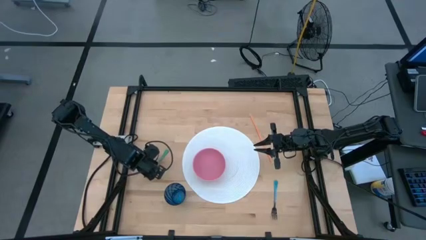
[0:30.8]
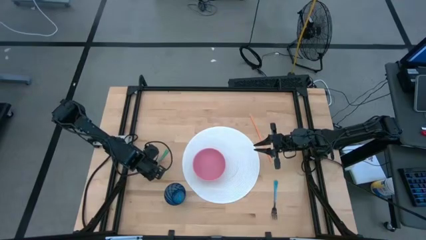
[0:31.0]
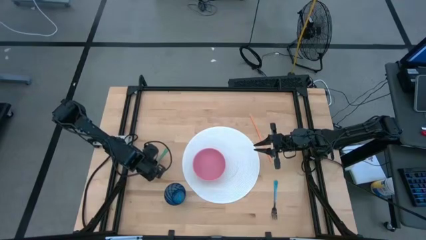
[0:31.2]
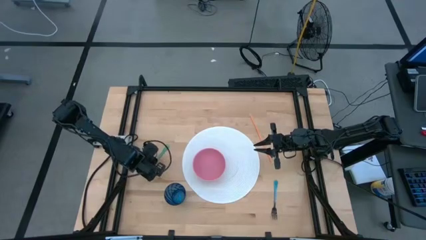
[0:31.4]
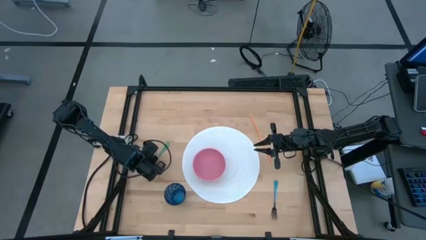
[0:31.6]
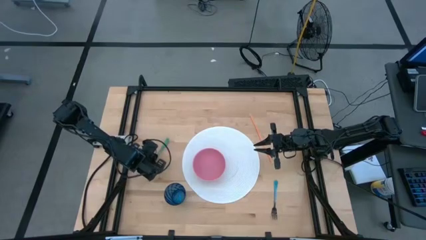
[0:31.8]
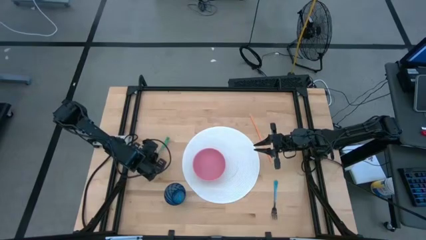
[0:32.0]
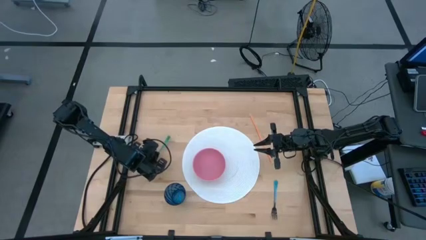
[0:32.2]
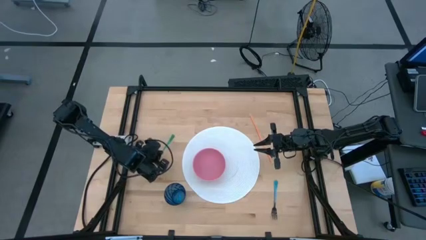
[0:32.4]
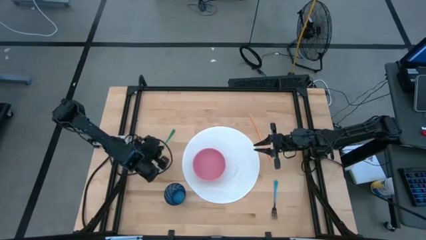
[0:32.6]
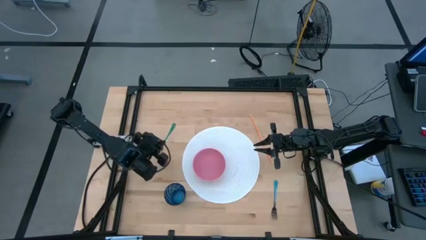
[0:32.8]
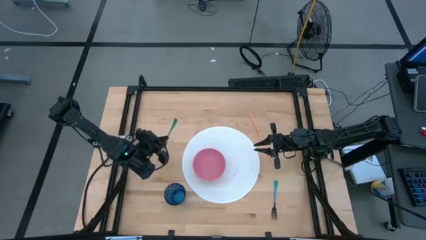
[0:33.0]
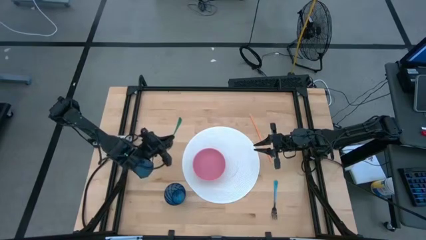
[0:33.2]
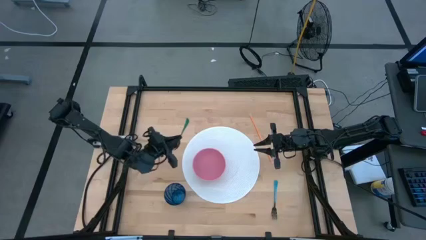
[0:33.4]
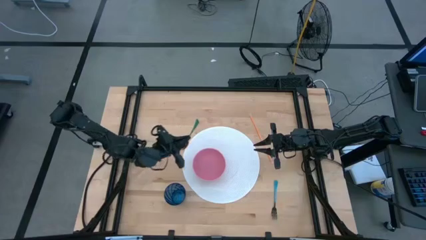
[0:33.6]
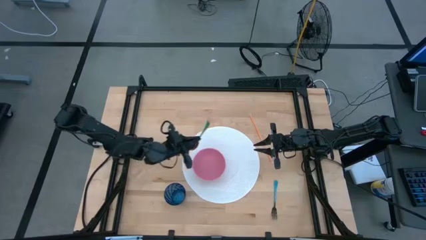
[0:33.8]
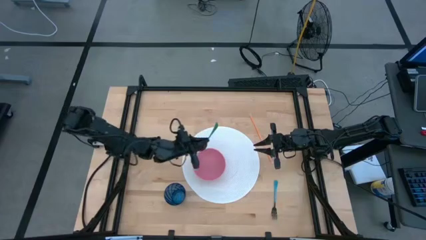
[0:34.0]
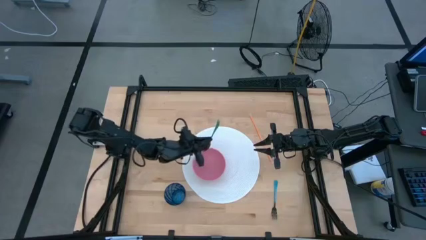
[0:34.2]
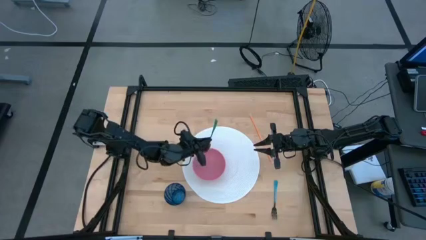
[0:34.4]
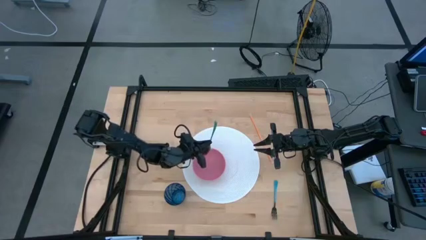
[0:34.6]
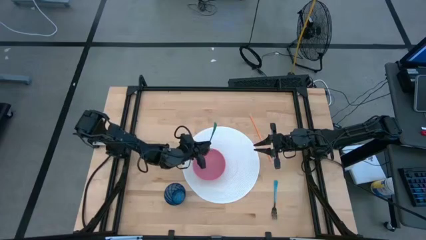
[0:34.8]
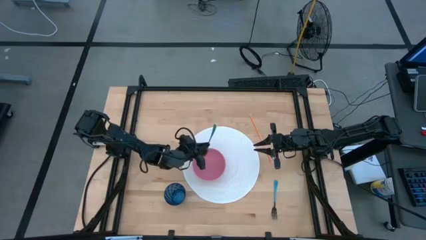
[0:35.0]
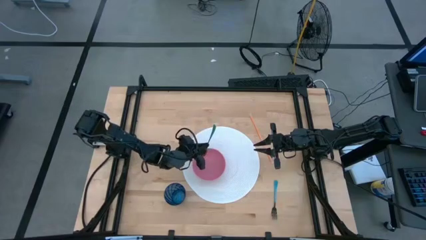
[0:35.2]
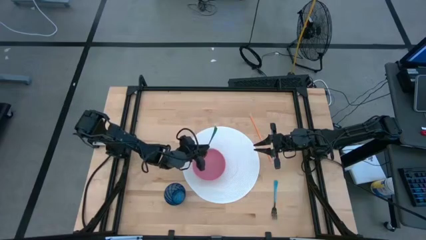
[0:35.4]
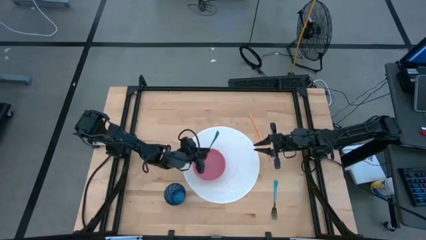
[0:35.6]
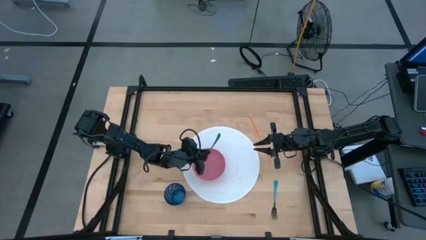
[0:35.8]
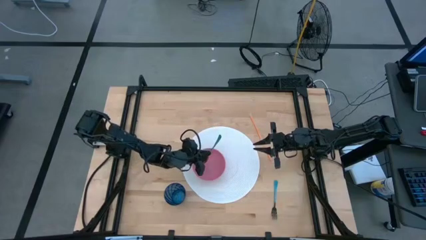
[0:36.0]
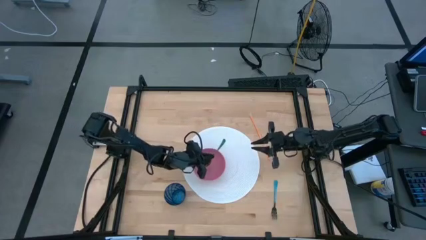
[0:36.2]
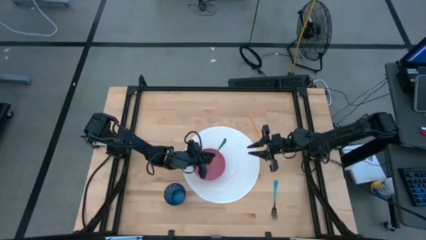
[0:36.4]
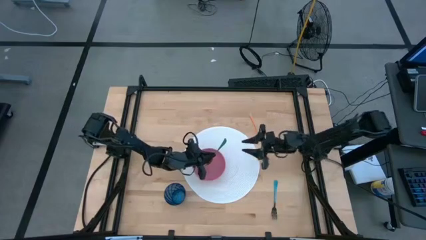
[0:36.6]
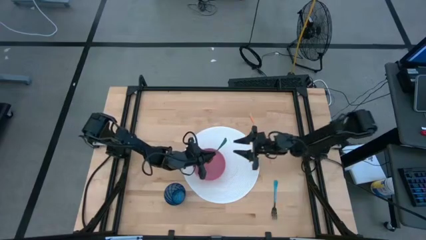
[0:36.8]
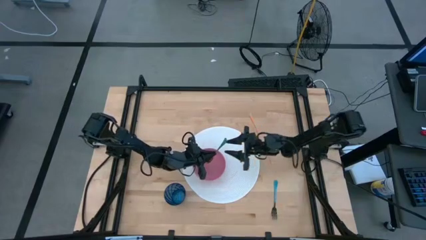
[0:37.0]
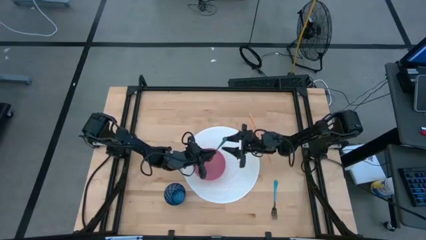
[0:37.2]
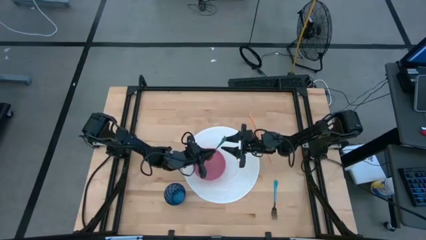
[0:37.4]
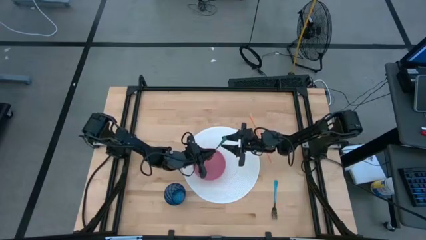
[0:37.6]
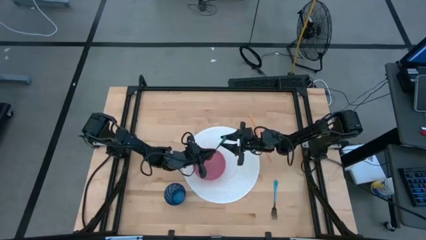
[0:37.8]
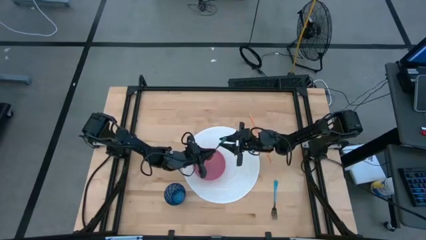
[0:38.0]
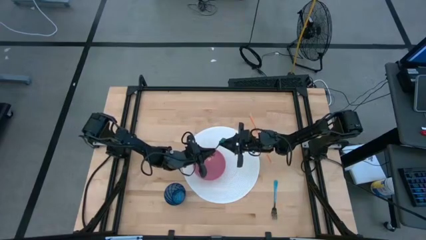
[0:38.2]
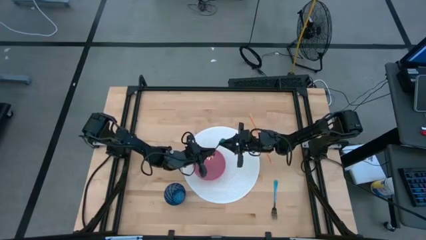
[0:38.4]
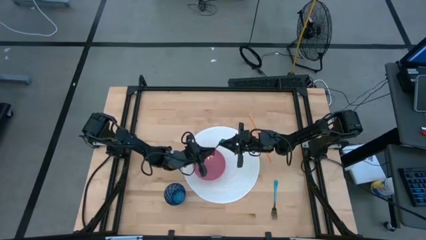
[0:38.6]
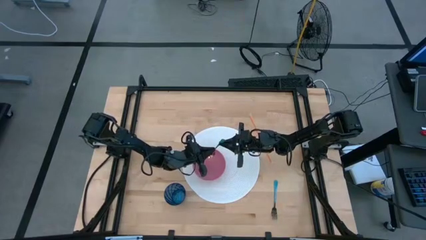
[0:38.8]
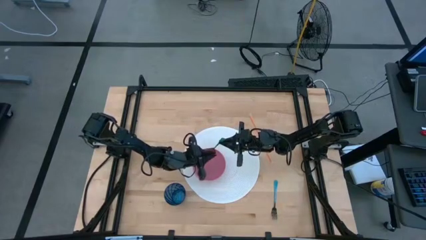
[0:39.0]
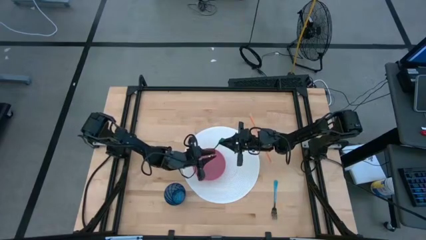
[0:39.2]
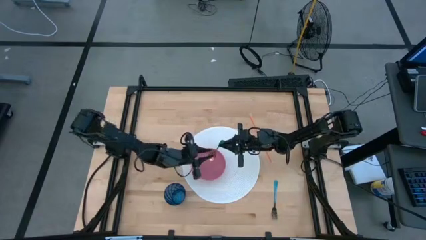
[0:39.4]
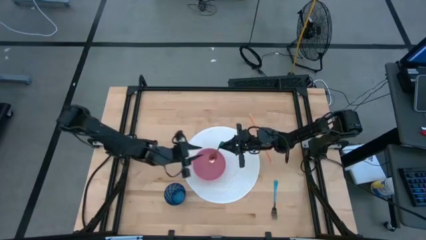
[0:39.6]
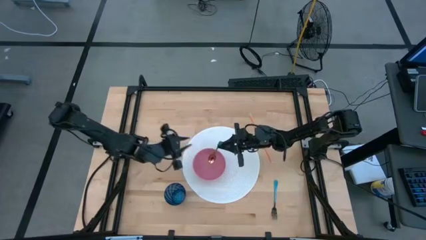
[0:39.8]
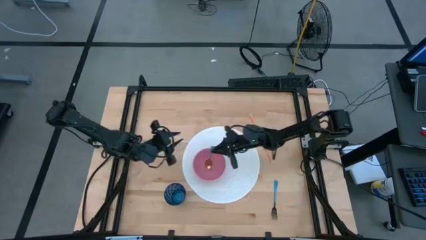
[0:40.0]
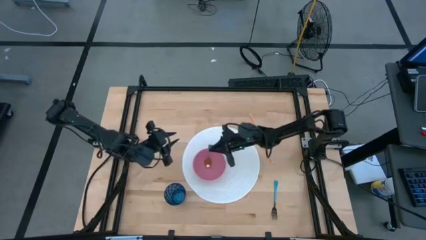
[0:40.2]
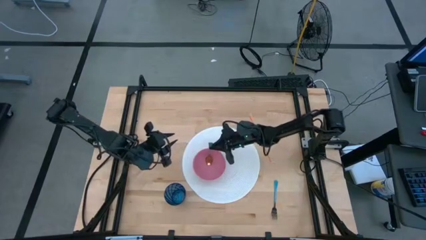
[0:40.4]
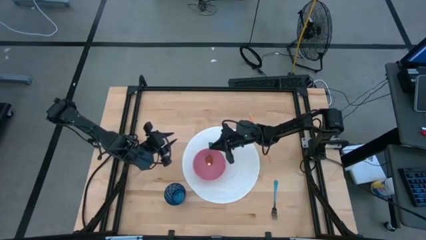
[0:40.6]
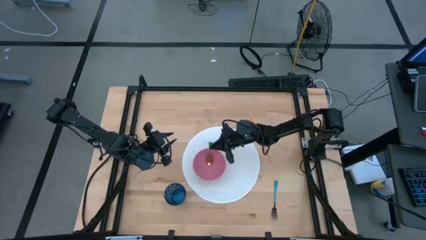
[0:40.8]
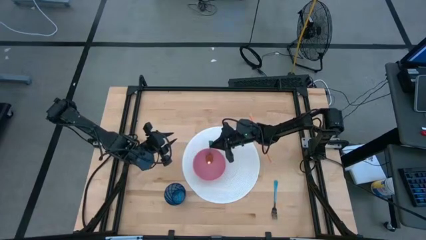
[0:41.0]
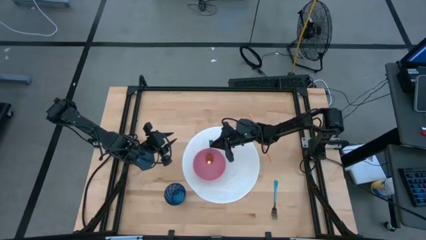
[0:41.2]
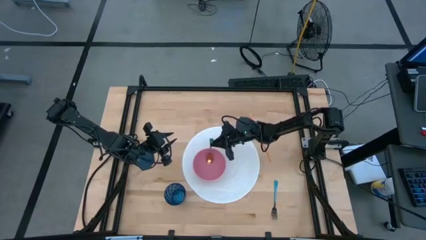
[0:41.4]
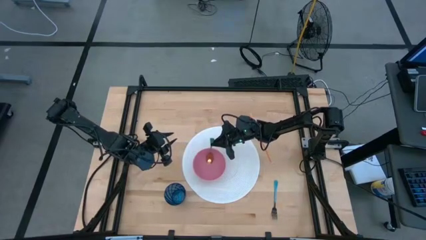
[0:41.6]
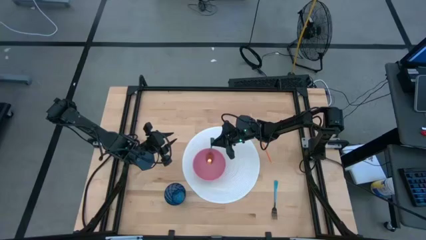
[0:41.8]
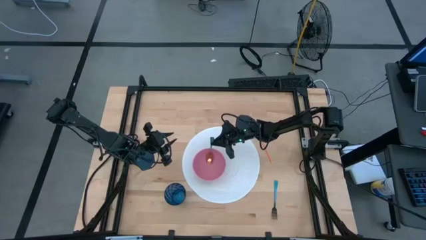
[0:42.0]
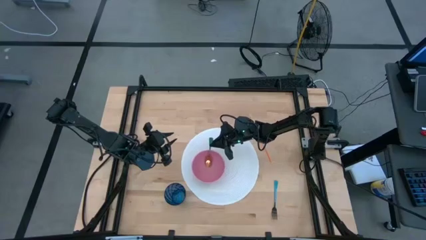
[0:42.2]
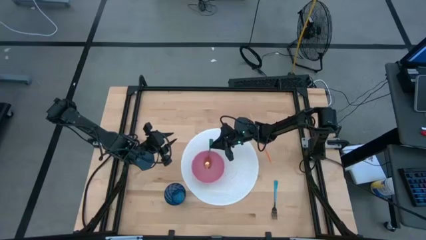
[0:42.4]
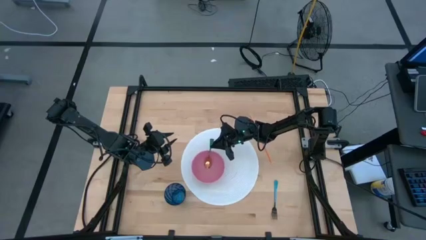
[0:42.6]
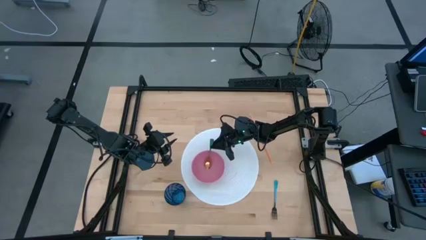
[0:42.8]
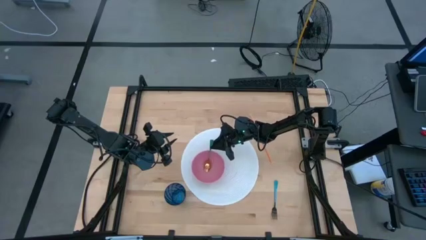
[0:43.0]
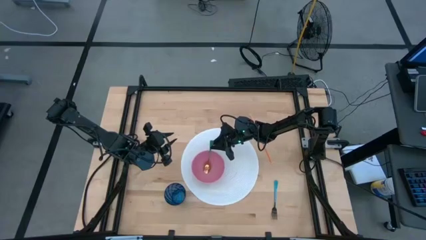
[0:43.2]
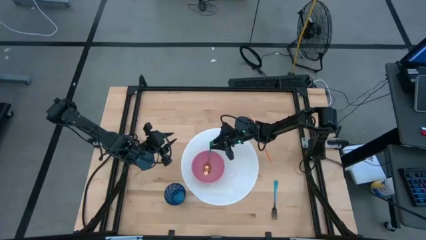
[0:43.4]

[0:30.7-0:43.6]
Task: Pick & Place Utensil
Put the green spoon into the pink bowl

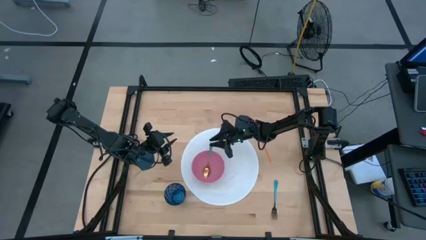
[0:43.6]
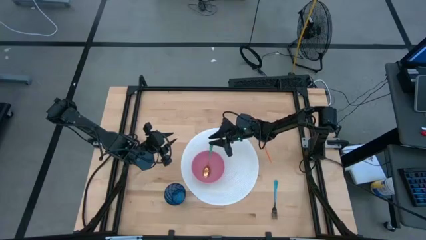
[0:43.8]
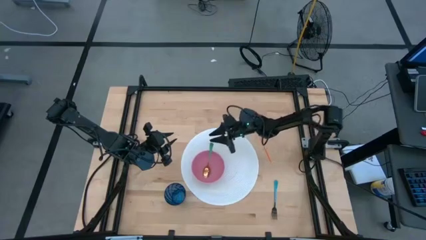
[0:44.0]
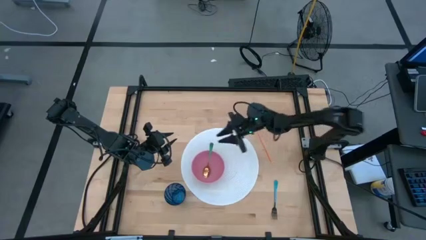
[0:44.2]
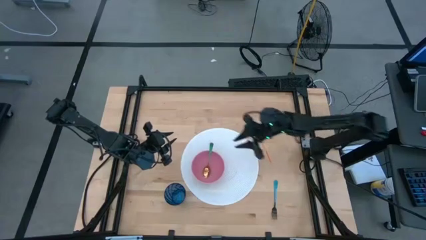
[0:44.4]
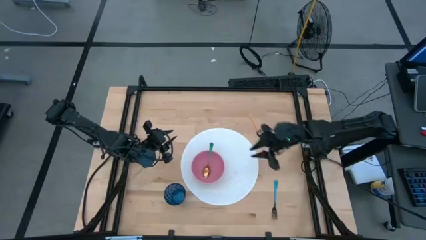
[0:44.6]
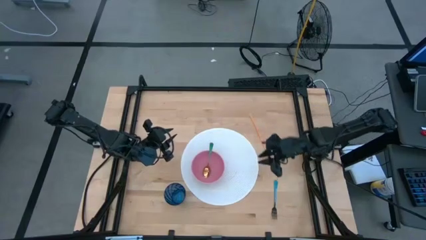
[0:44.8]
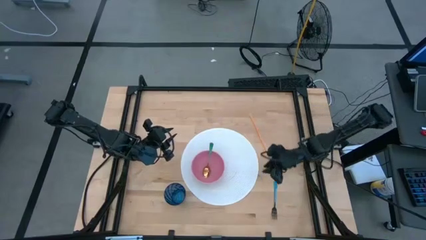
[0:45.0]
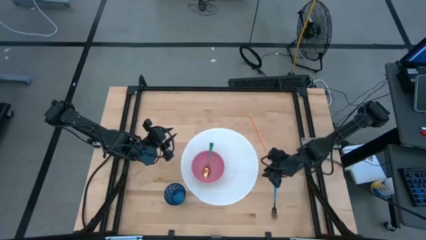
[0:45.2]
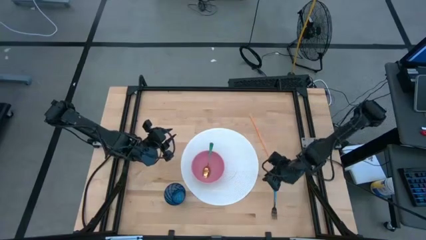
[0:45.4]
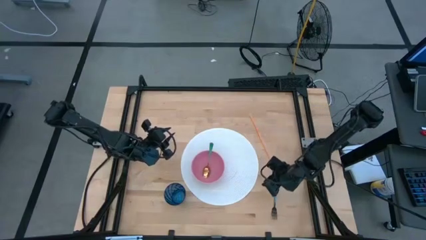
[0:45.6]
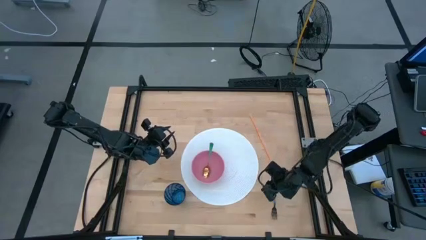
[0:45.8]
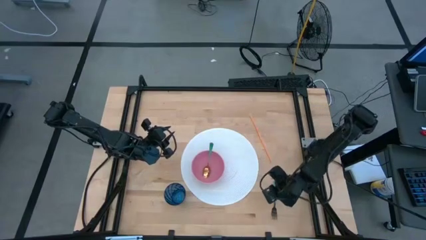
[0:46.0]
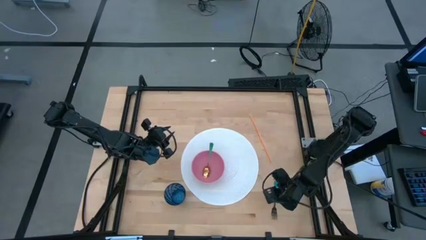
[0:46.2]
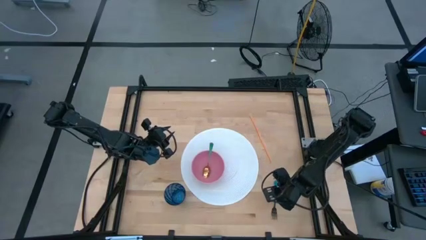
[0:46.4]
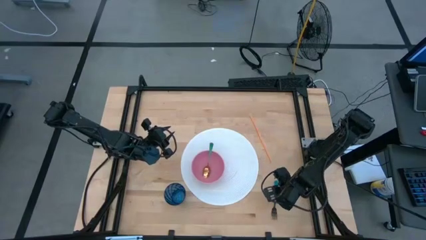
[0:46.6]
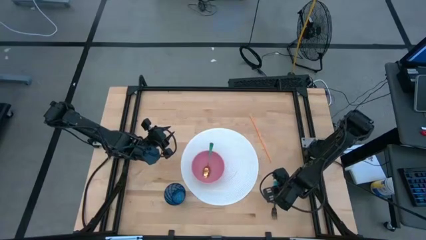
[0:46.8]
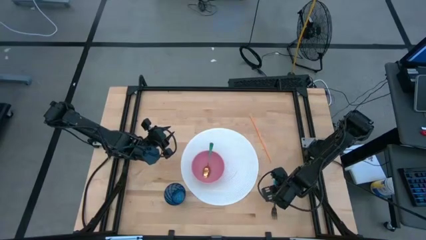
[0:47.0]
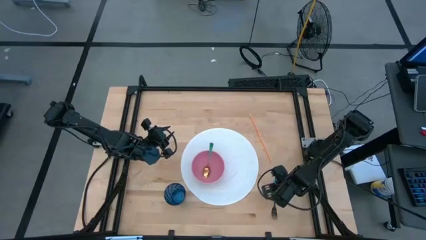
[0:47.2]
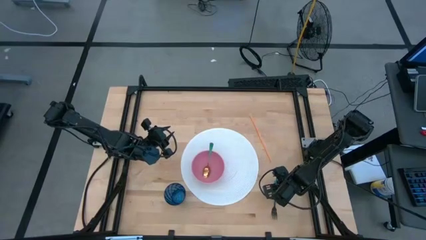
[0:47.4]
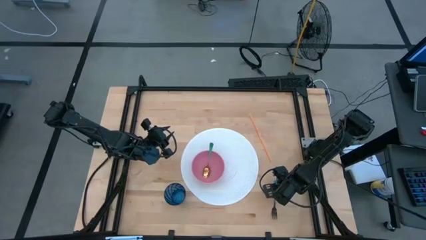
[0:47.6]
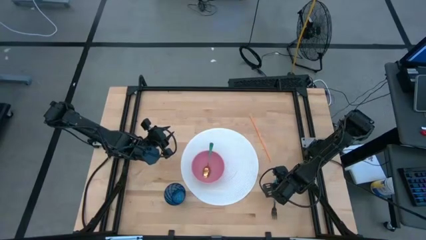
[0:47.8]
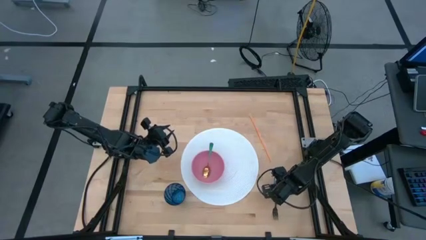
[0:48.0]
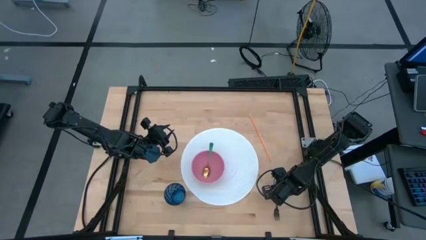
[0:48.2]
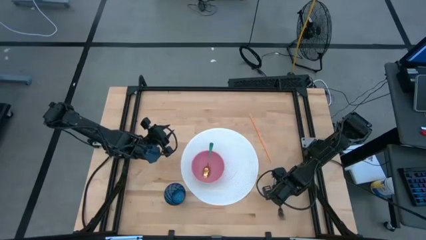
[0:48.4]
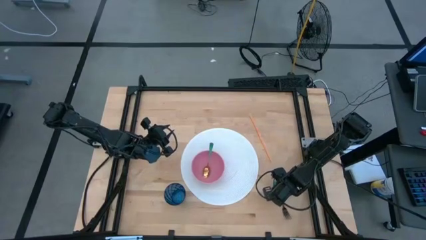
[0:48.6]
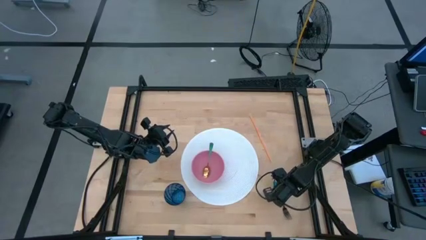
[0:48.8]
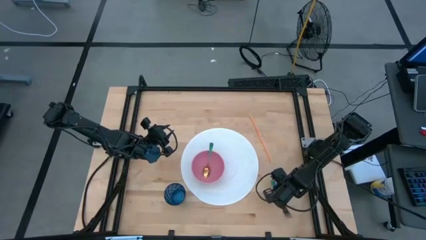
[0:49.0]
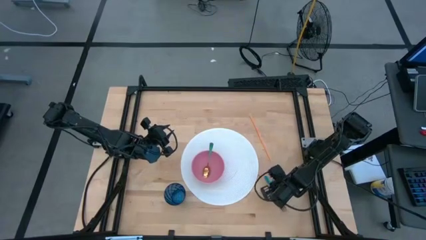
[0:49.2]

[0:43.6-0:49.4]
Put the blue fork into the pink bowl
